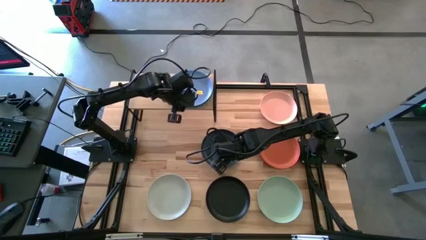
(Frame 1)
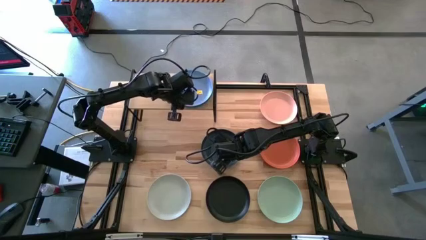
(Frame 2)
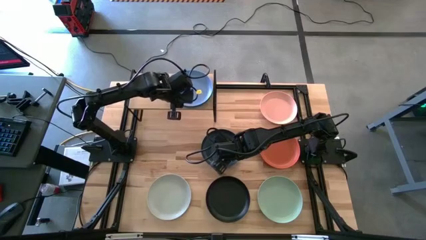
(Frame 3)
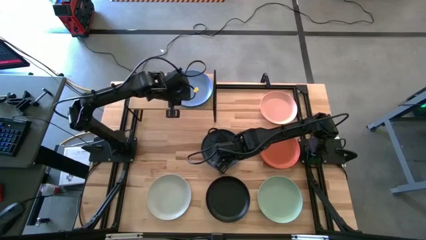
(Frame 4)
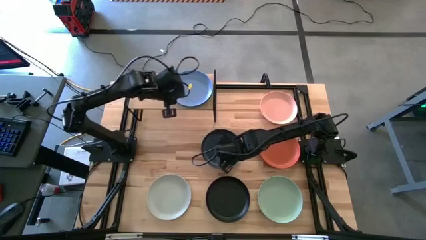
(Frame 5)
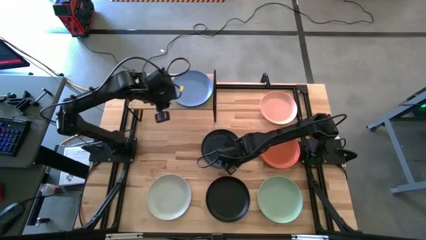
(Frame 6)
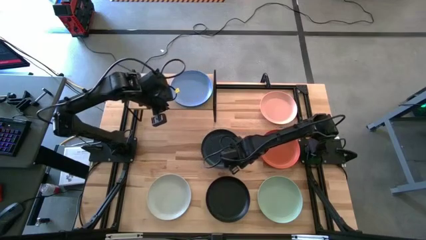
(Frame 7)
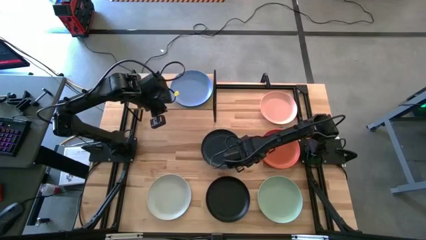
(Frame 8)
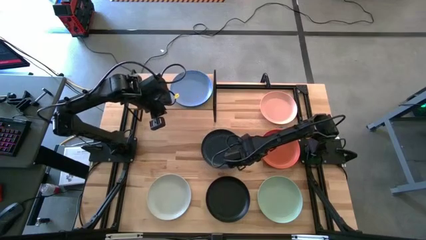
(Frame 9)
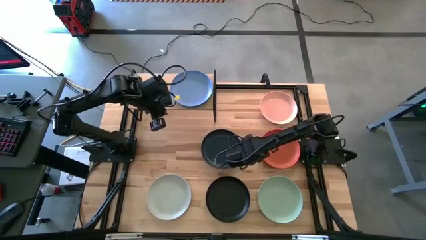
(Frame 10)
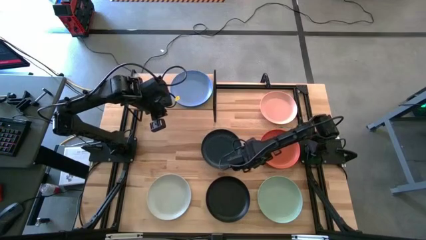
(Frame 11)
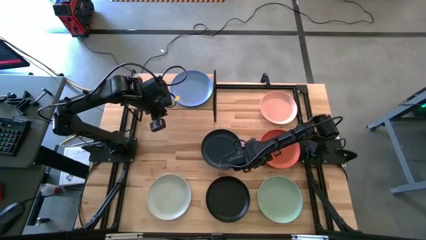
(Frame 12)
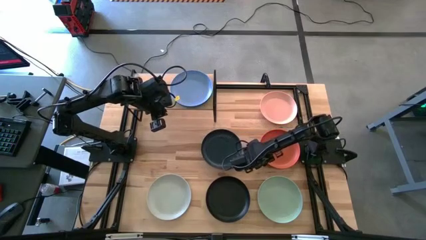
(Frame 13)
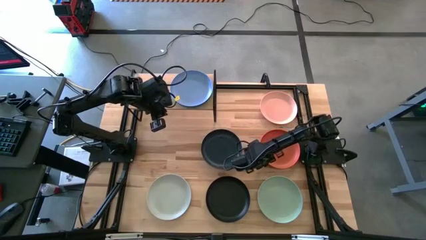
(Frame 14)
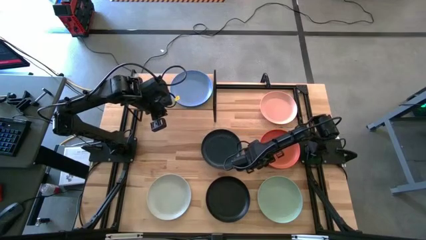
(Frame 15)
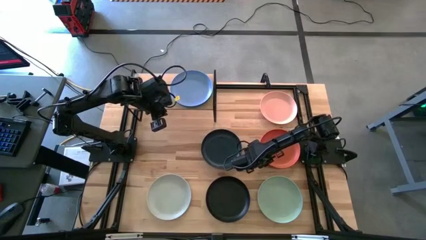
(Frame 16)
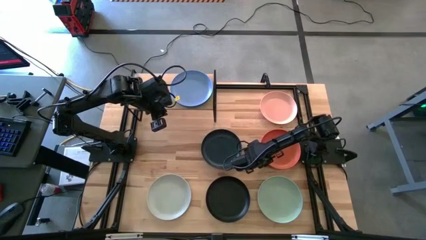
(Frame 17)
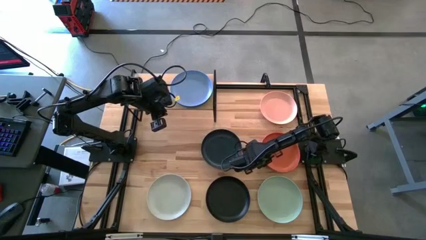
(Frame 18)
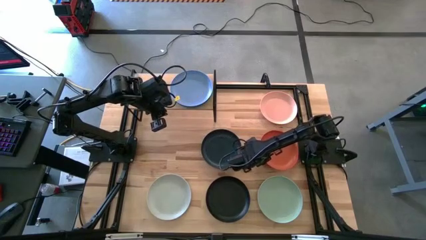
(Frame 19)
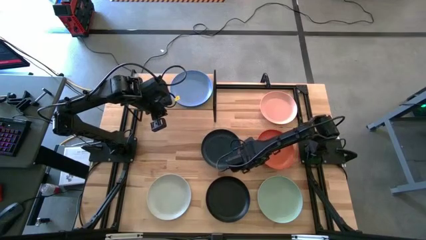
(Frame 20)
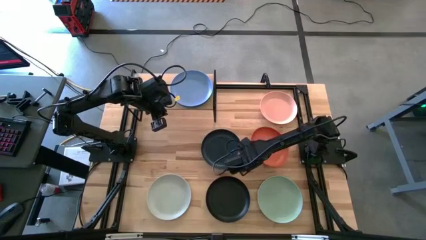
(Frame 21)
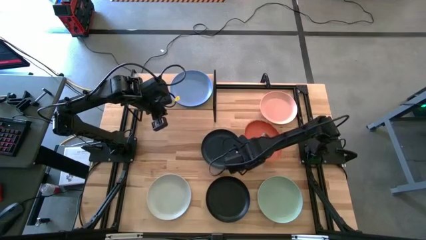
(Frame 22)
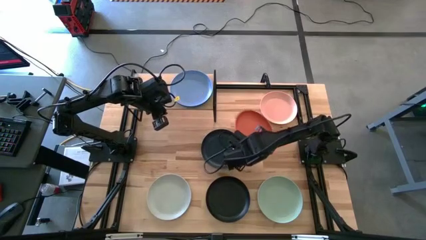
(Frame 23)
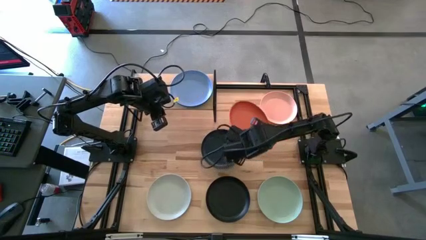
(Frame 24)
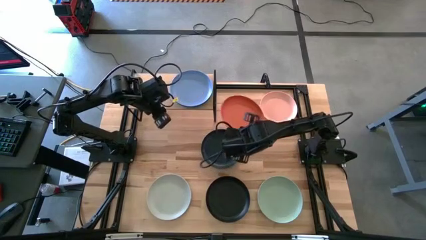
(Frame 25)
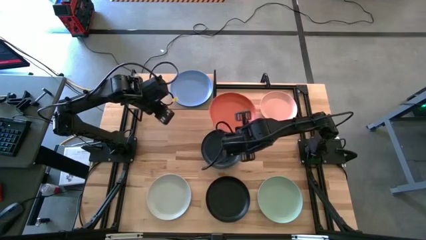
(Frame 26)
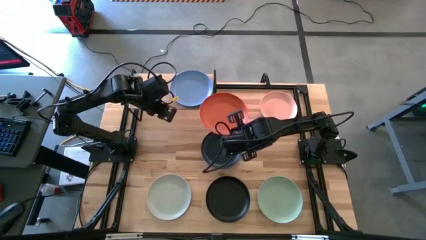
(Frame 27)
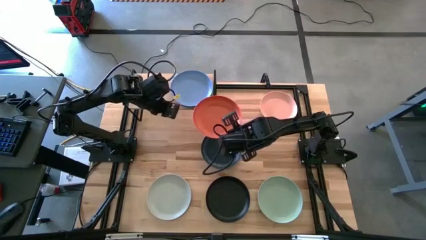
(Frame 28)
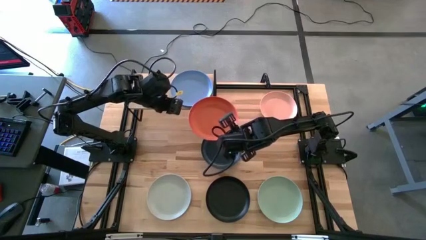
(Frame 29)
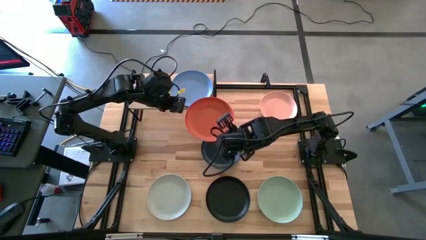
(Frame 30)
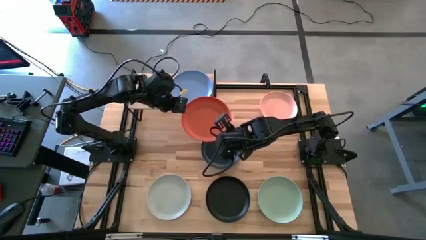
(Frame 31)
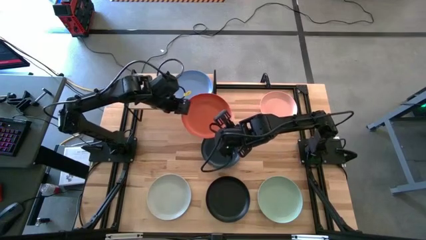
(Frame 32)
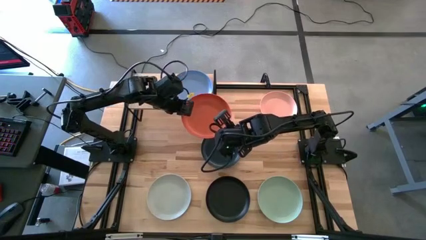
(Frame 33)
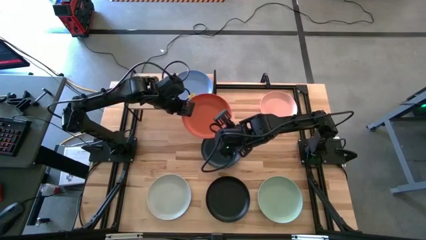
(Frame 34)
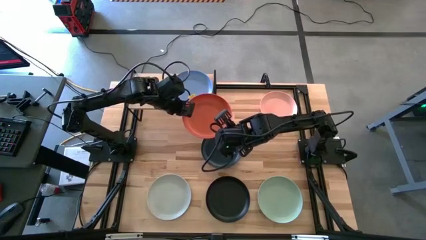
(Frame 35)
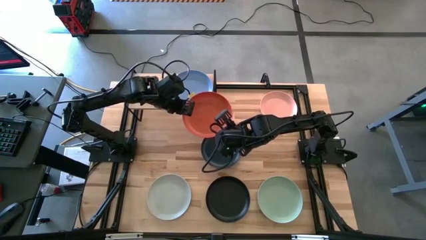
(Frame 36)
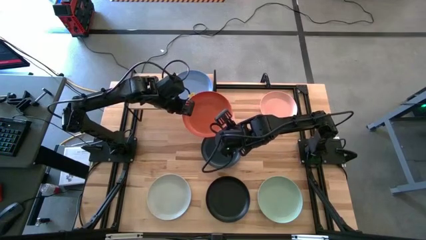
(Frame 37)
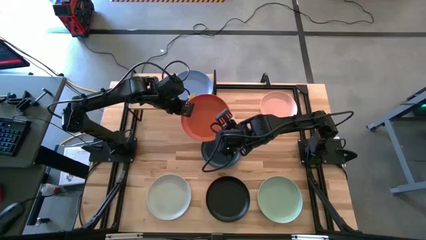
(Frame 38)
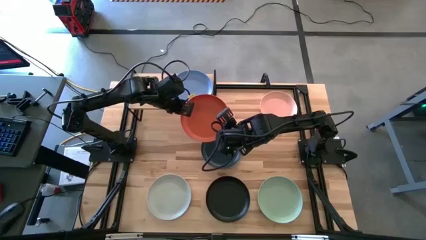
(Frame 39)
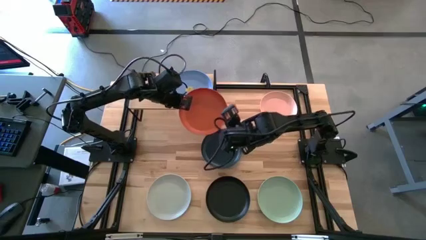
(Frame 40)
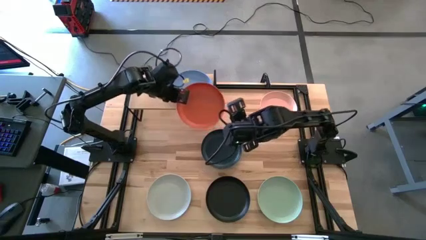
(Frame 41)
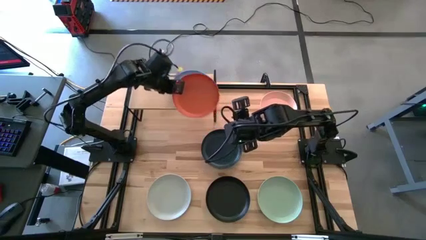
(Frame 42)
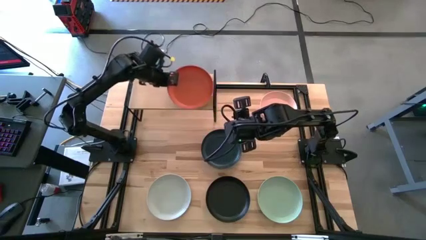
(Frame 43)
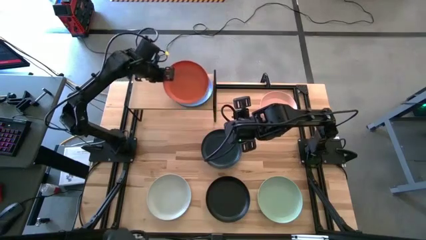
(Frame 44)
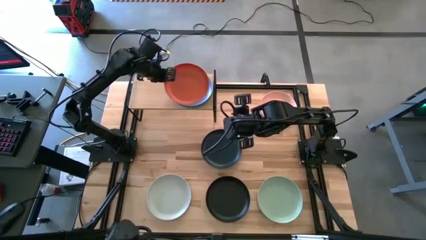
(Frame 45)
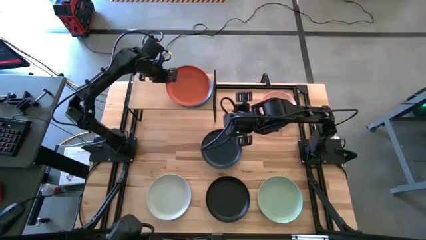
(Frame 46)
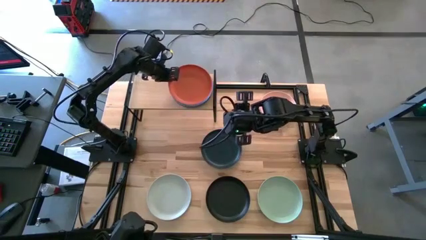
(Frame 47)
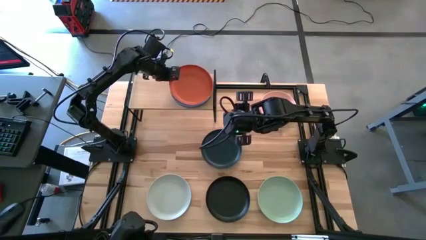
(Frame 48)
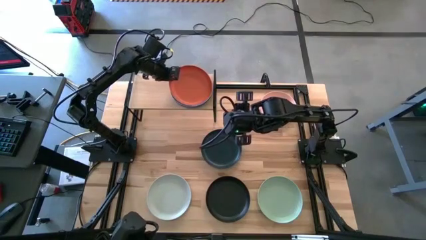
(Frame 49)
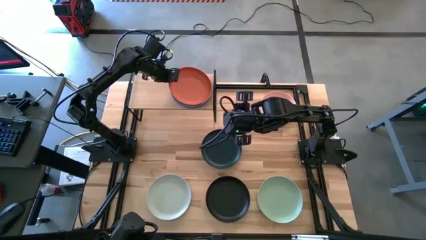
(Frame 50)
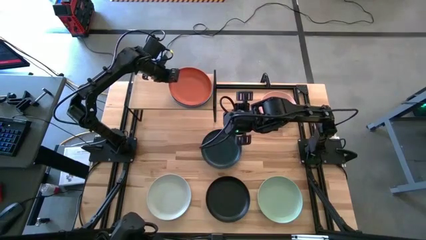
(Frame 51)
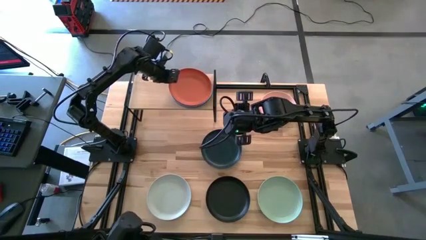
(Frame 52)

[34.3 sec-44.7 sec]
Task: Place and stack plates onto a shelf
Stack the orange plate on top of the light blue plate on the shelf

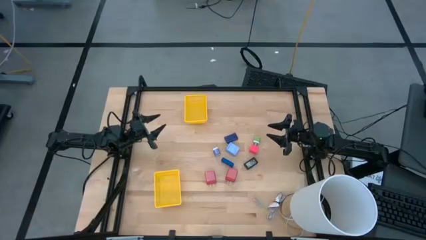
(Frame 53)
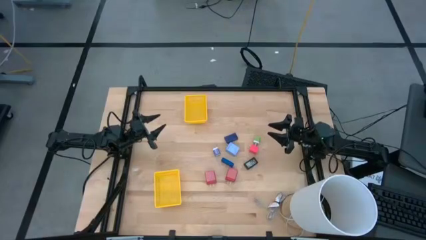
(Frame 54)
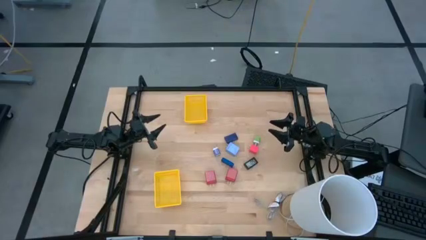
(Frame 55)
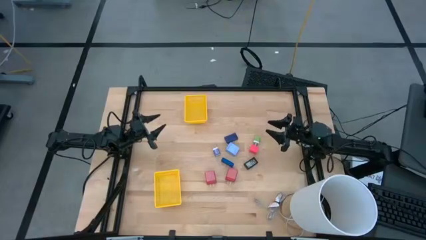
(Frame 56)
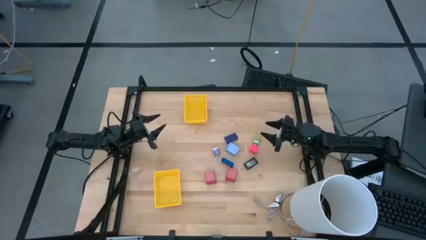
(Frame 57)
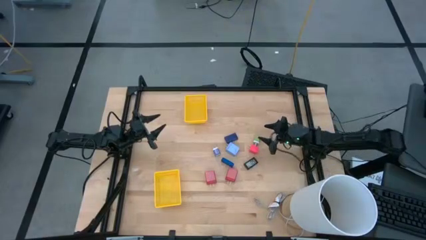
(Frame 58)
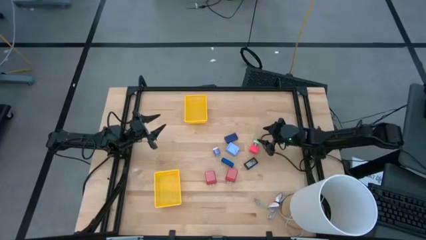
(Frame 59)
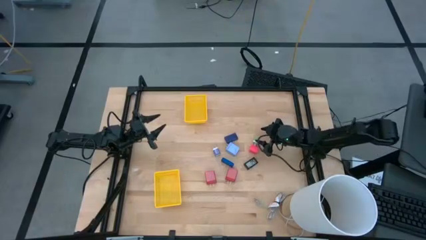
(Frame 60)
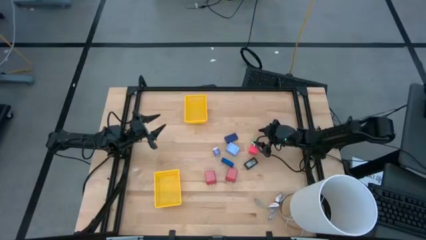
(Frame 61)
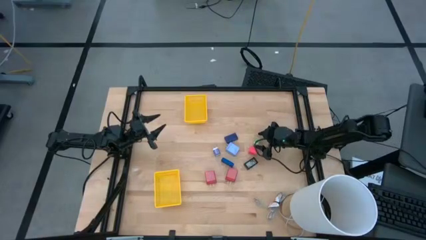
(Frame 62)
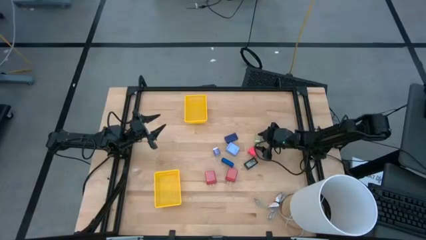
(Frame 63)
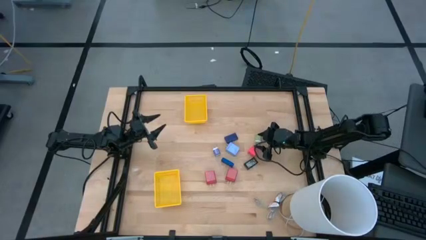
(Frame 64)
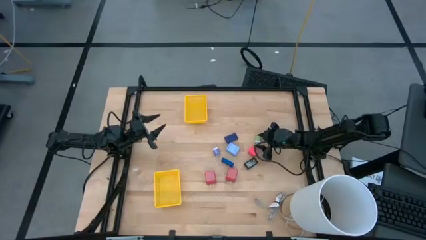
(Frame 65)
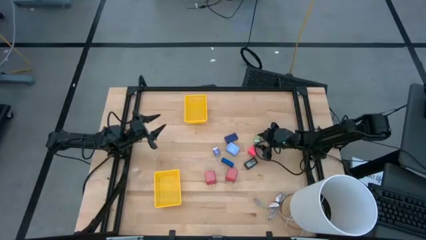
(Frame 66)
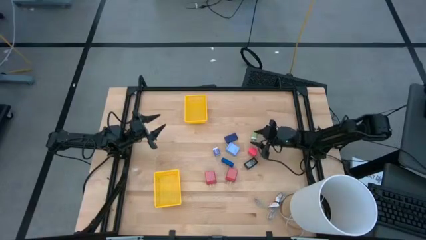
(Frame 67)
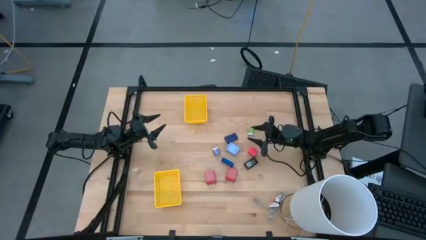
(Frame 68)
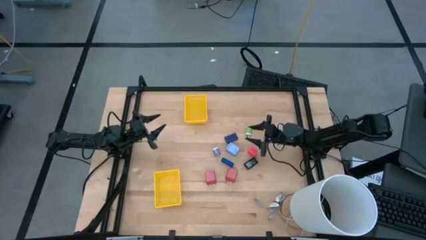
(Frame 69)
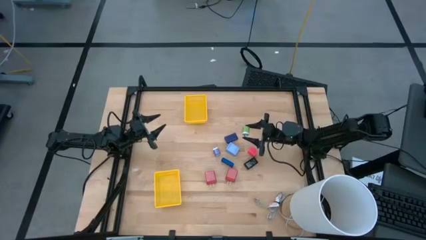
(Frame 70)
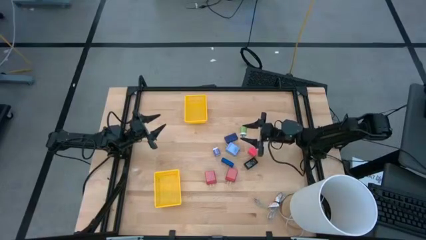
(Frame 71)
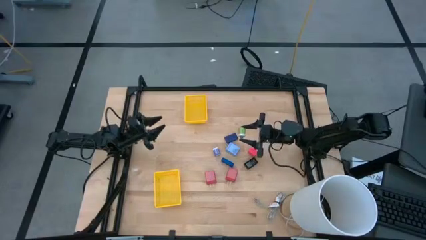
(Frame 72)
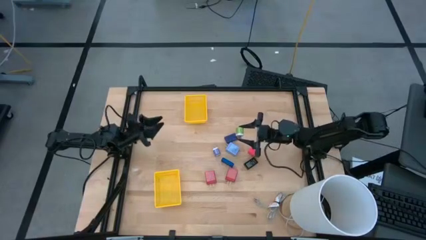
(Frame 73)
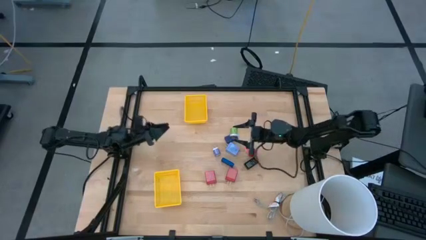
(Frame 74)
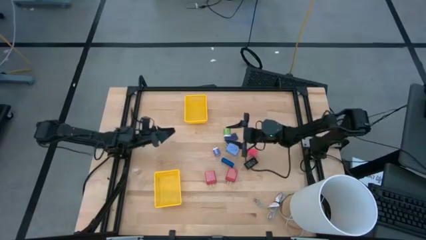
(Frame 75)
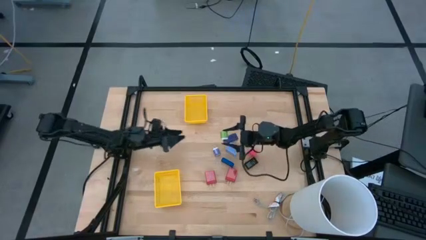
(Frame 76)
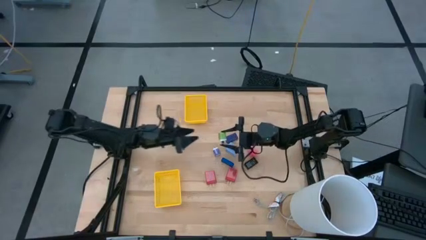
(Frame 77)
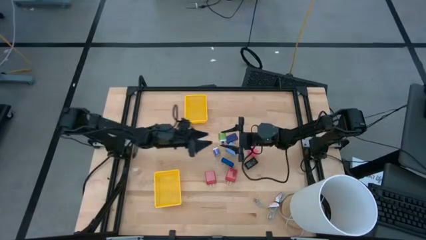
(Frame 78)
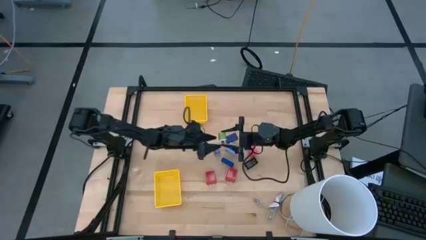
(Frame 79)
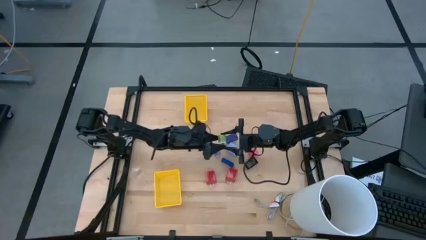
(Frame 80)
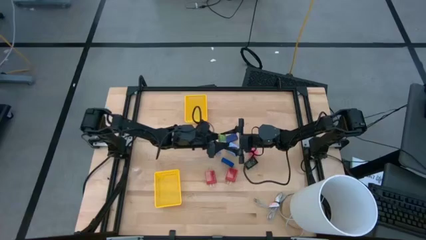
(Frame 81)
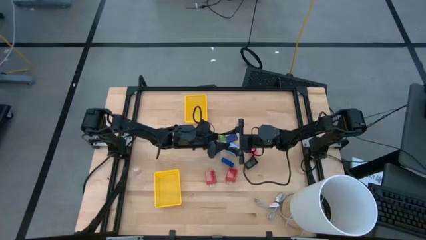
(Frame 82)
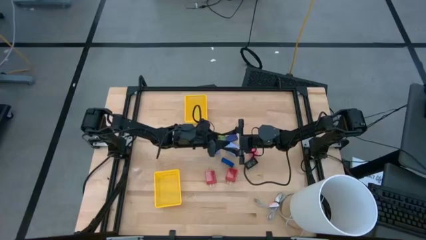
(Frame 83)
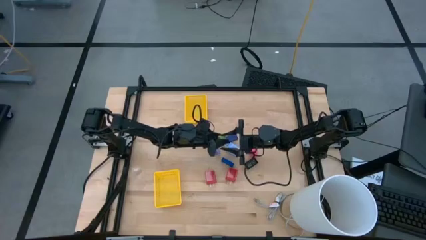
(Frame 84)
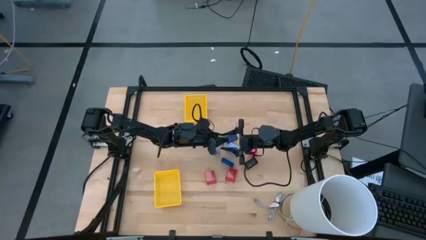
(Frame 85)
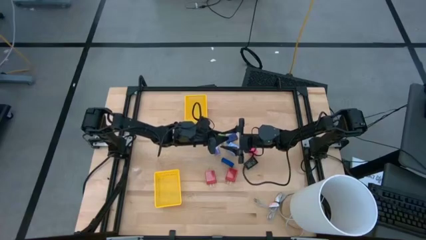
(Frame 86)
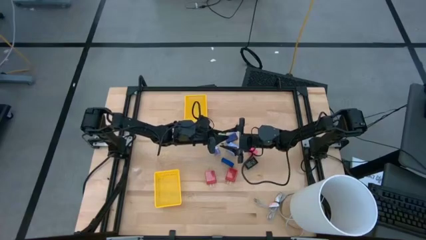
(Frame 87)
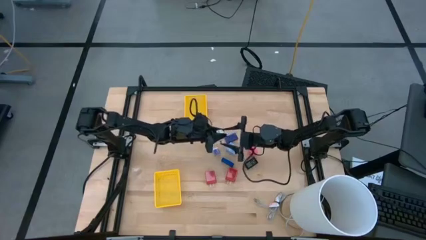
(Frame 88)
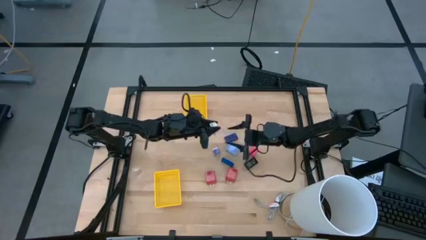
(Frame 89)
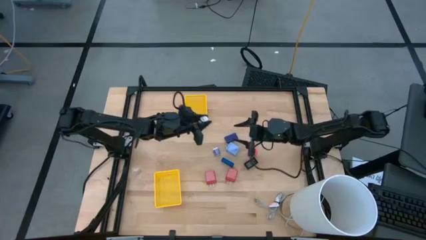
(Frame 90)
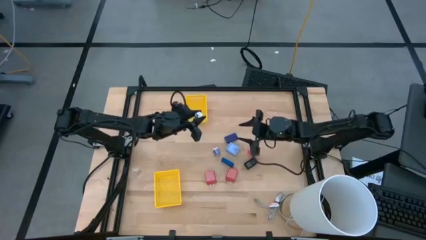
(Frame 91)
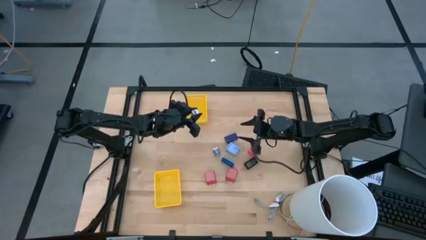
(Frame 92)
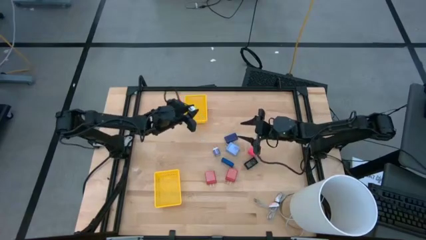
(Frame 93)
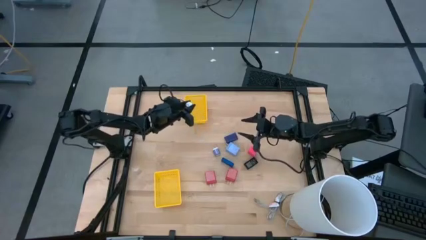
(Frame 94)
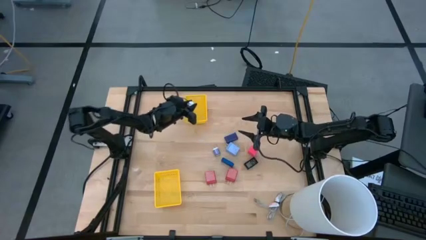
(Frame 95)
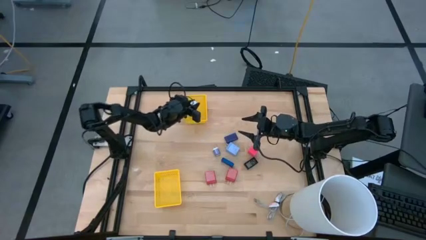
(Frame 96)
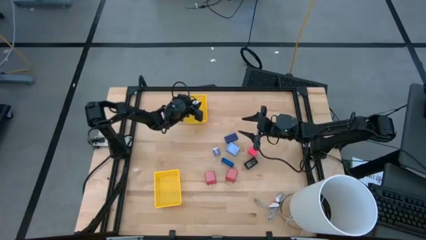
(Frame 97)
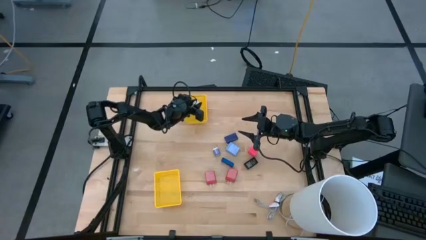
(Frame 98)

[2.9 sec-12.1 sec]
Task: Pick & Place Office items
Put the green charger adapter into the top yellow bin
